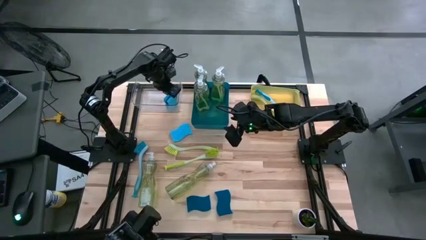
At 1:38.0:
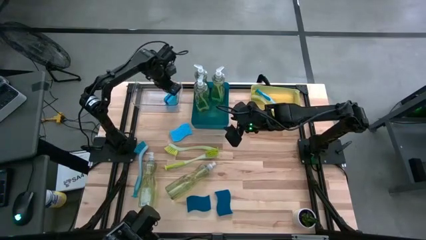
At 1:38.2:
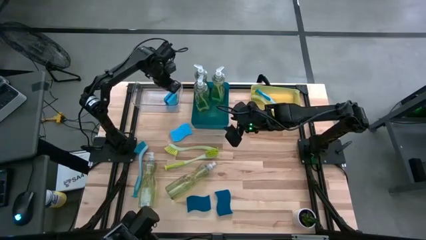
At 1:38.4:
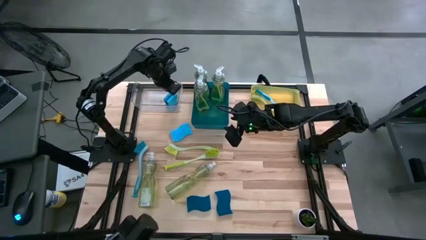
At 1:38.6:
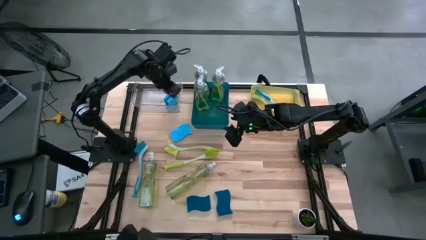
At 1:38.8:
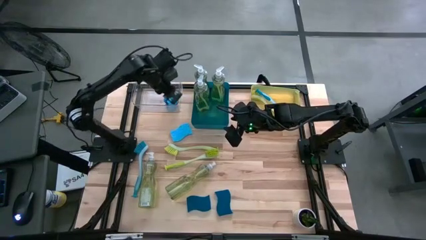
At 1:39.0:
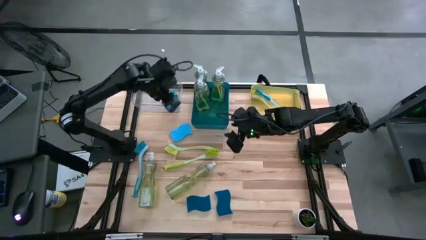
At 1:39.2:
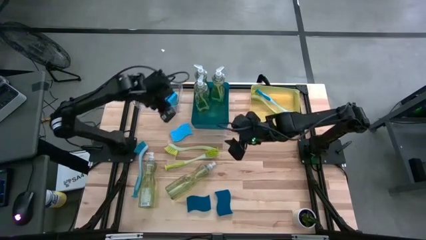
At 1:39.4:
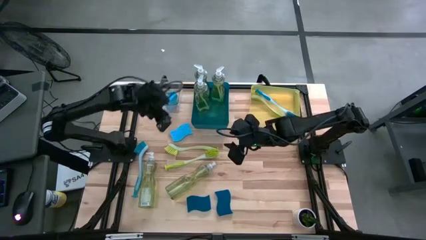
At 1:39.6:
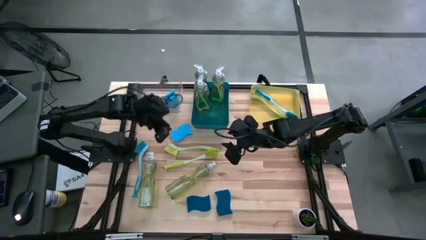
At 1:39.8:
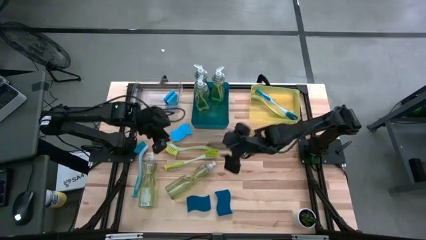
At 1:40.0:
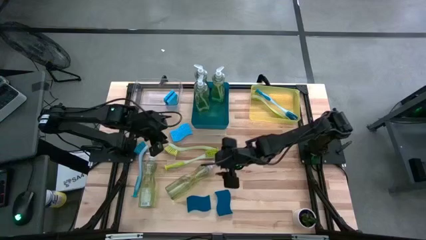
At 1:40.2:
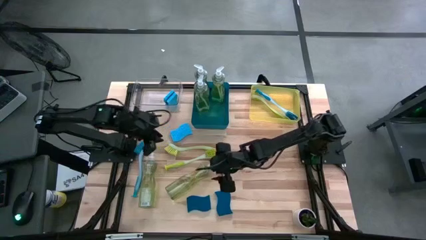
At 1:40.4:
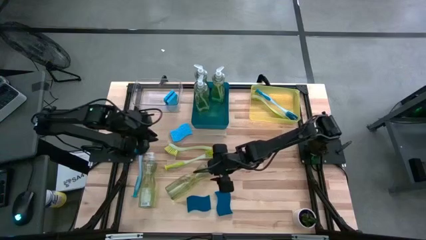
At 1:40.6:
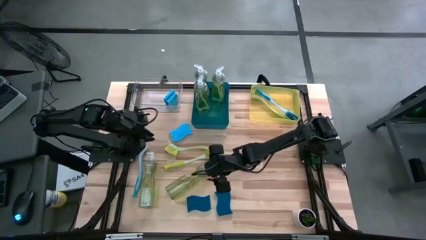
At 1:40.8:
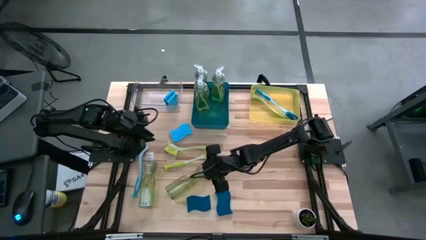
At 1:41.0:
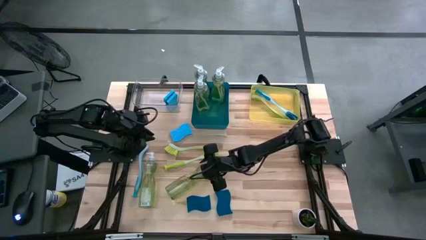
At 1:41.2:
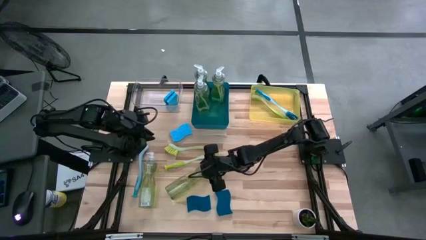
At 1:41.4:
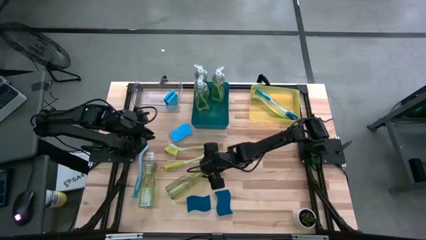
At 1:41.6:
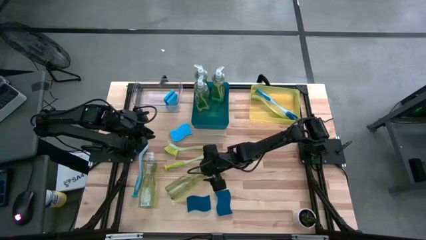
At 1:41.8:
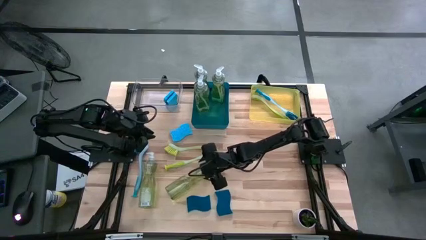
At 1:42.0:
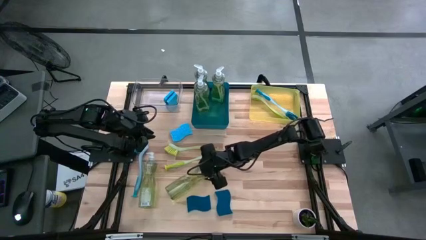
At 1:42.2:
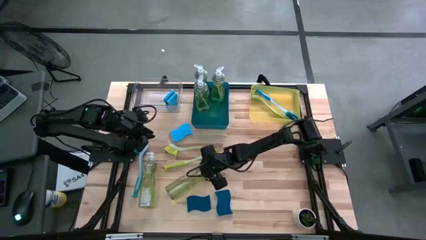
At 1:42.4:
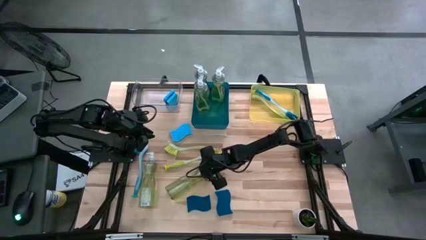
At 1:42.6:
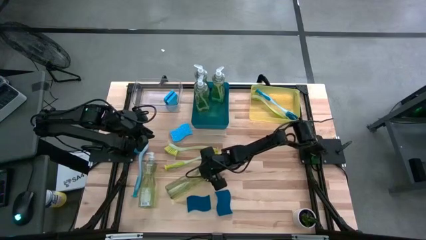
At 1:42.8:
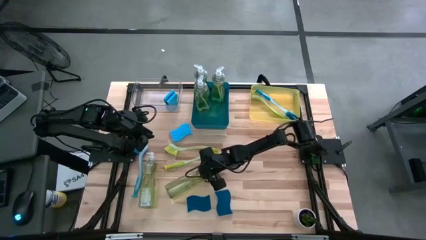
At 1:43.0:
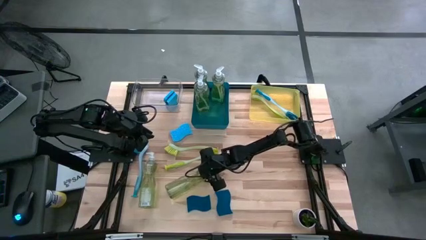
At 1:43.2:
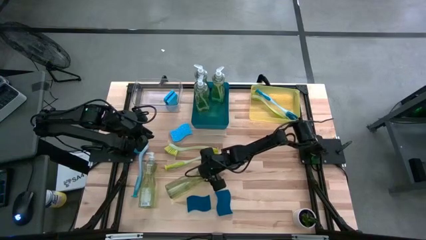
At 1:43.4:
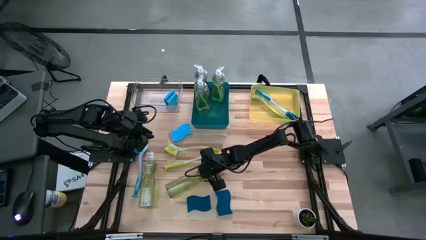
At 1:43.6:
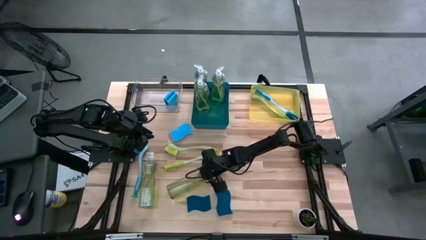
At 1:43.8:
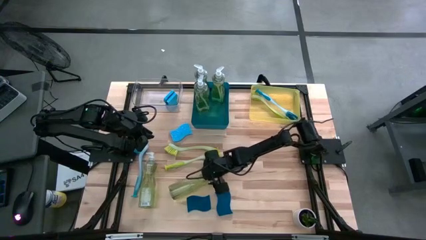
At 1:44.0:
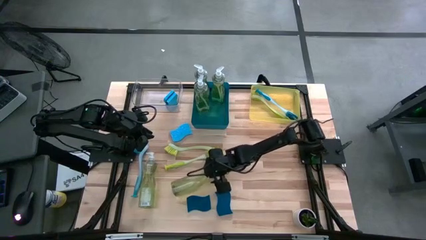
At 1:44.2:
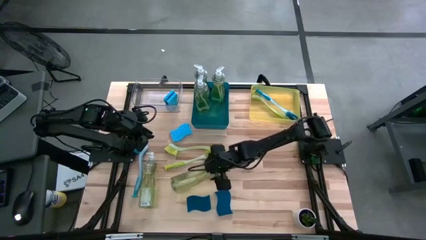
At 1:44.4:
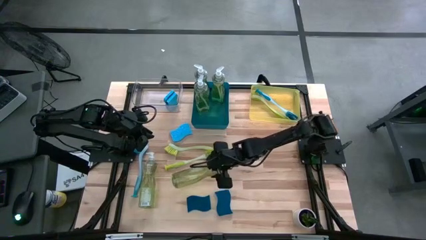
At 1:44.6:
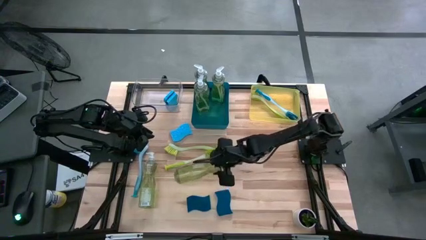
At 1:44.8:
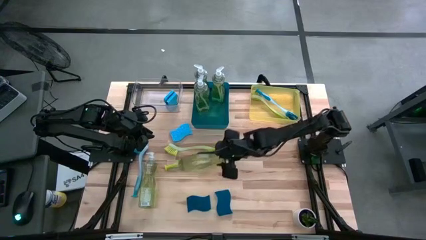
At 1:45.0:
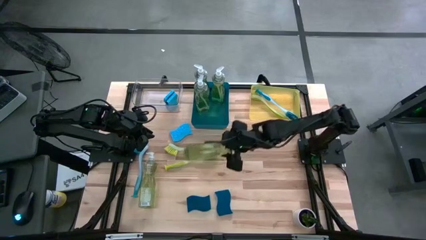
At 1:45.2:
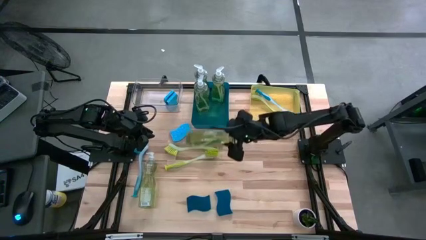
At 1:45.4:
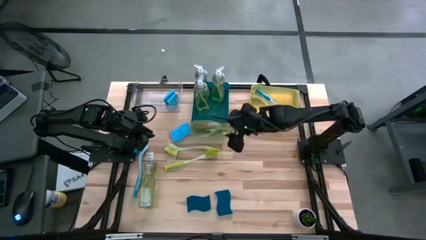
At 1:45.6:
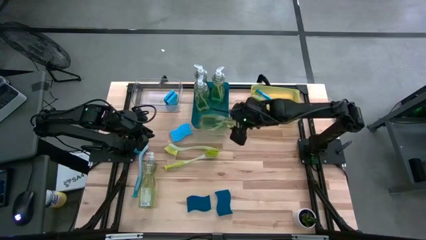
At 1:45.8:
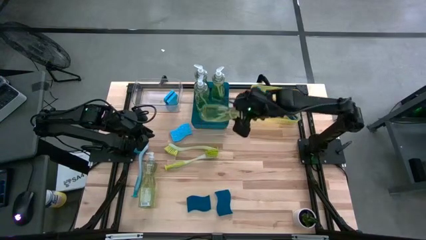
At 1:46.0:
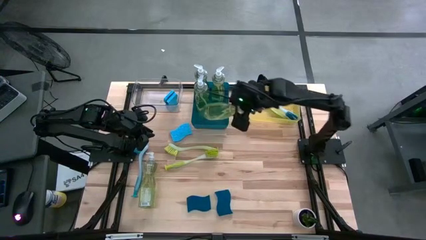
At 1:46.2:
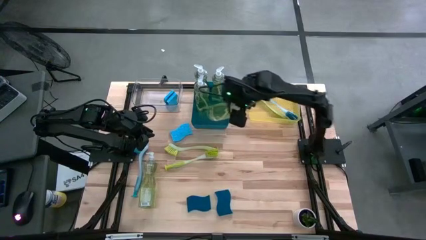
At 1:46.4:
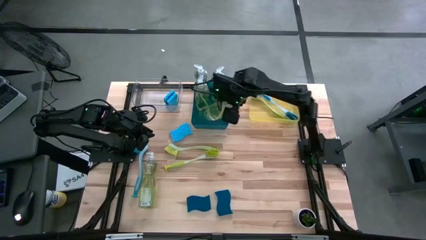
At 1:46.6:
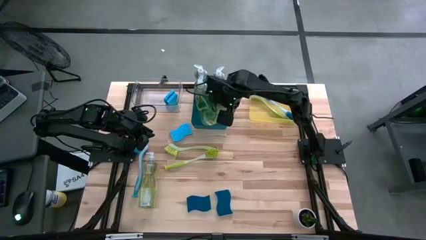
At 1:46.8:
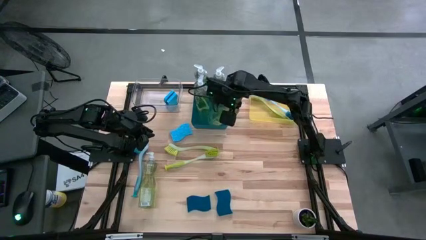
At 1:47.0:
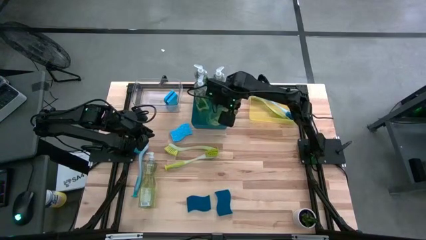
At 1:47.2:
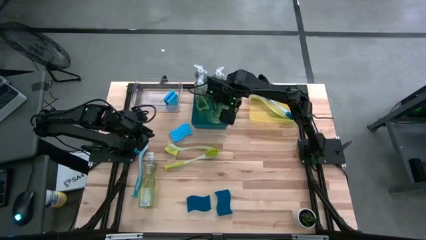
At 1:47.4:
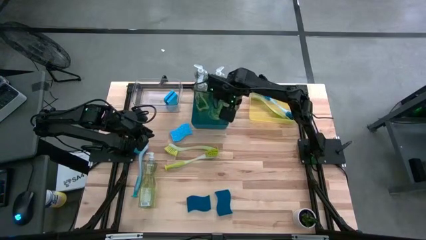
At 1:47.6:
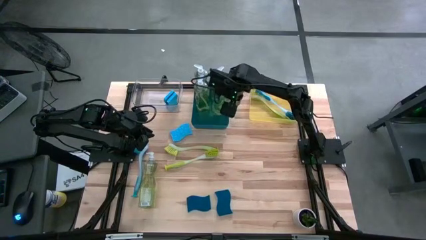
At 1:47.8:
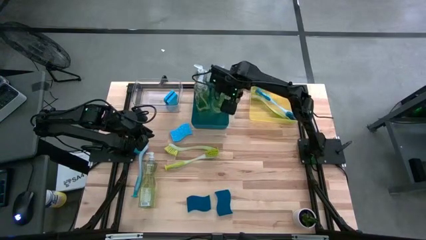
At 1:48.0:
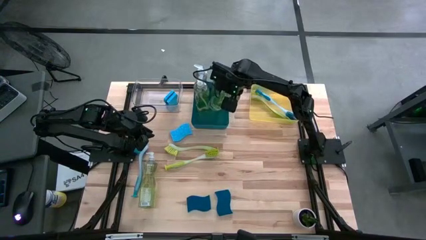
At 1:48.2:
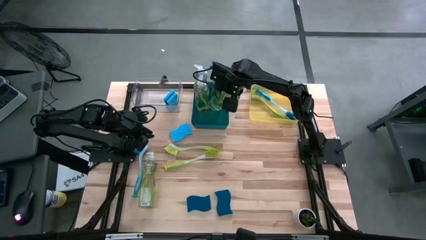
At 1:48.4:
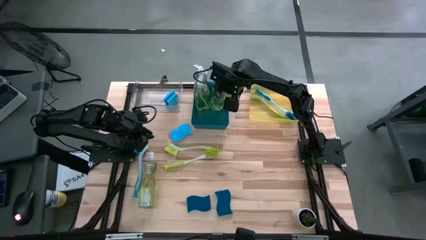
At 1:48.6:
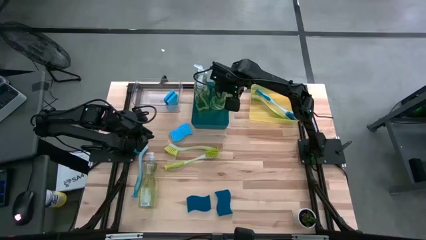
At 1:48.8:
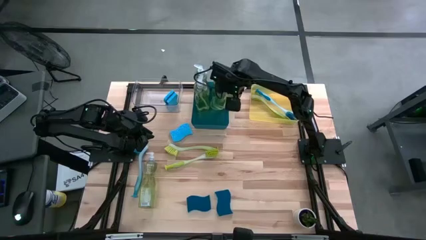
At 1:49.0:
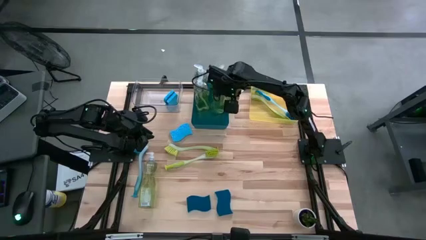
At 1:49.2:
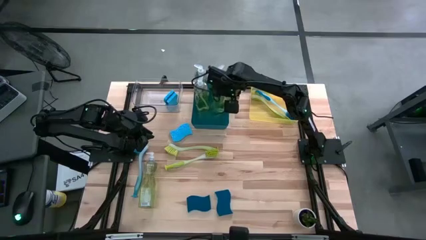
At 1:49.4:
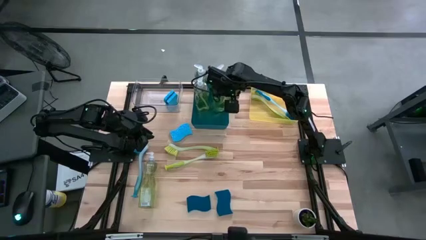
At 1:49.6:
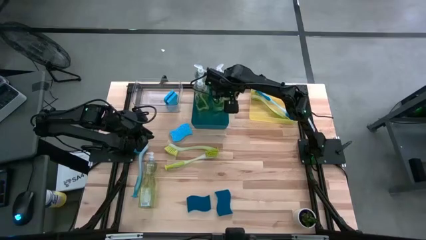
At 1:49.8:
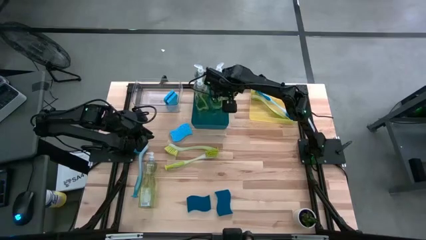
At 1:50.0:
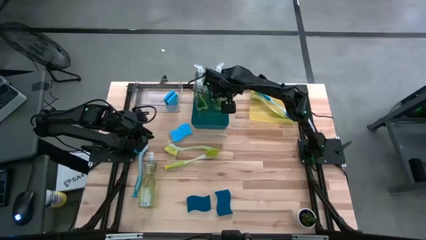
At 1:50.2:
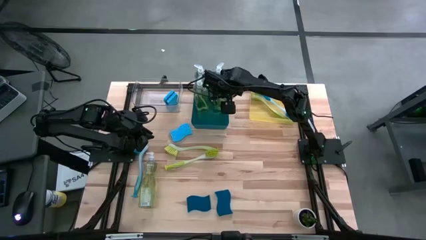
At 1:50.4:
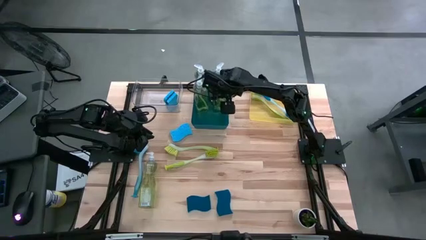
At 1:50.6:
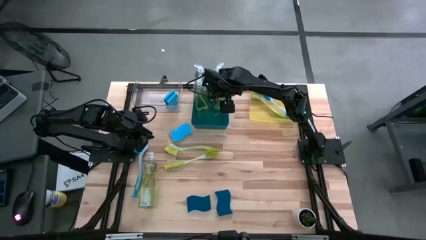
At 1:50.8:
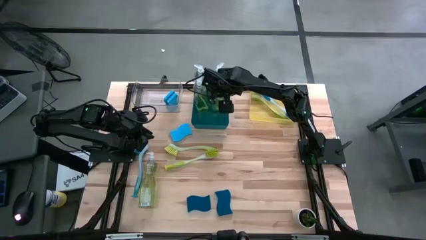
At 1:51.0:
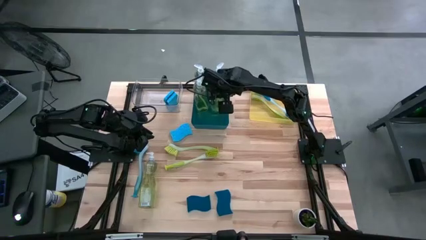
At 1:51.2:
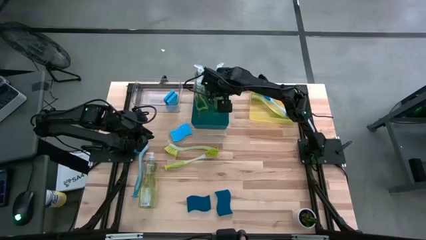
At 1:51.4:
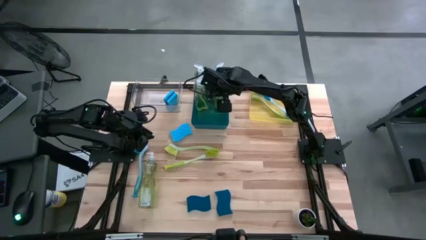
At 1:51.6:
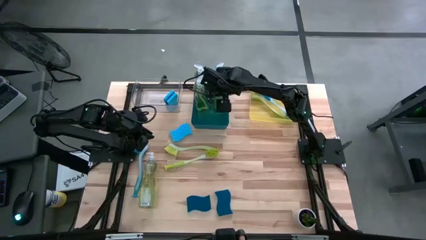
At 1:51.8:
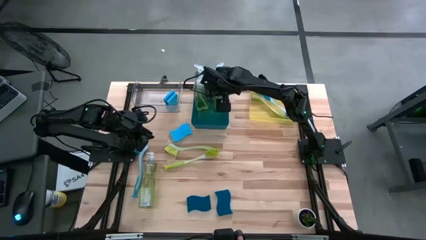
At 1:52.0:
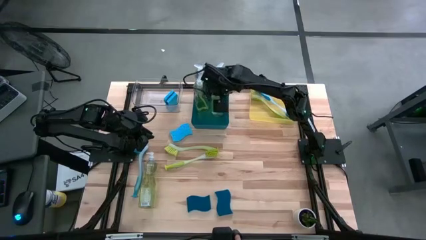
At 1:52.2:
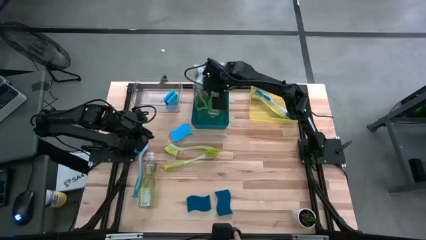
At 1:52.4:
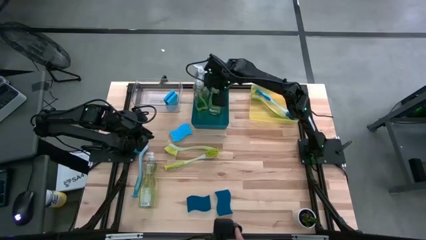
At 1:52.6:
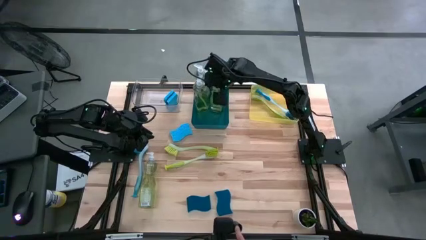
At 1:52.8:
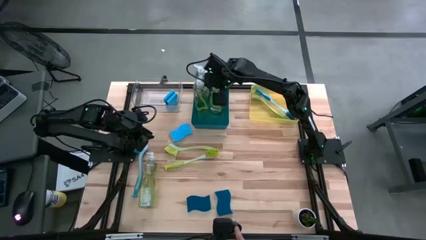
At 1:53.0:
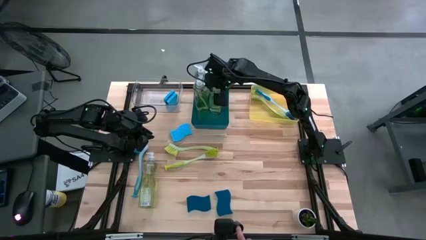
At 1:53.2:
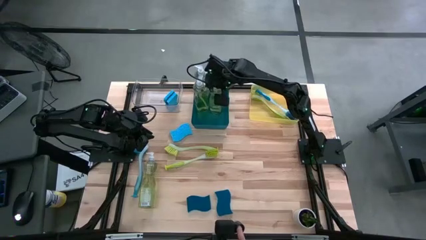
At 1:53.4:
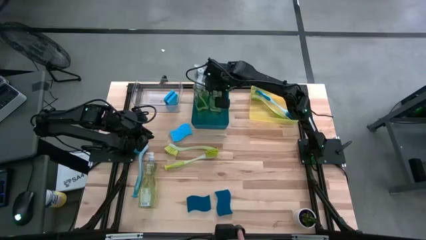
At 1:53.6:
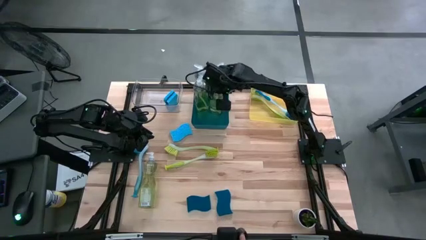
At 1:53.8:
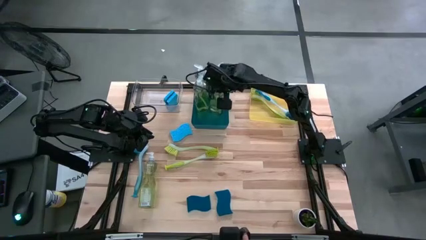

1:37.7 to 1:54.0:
Task: Pick & Place Kitchen Sink Supplies
Put the yellow soap dispenser into the blue bin
